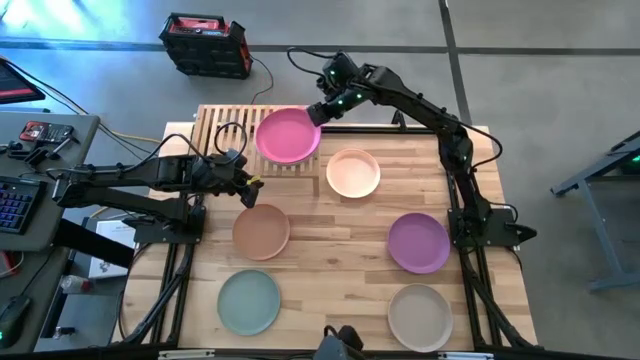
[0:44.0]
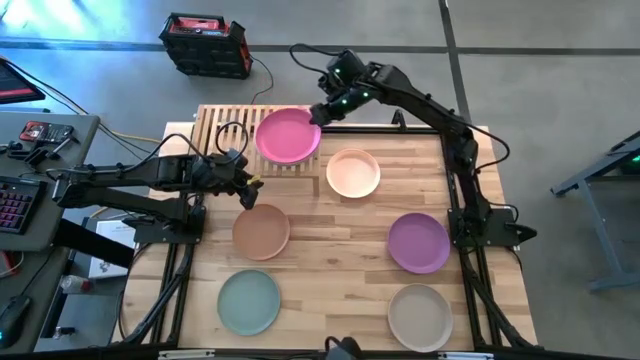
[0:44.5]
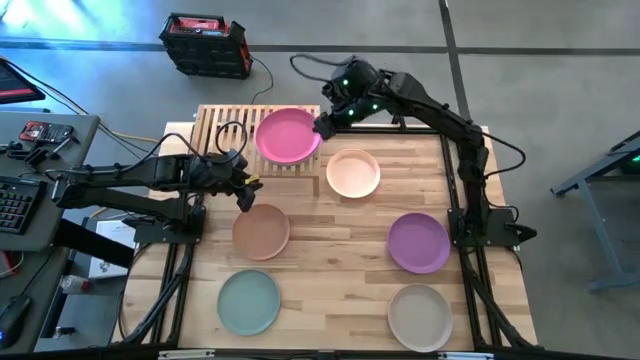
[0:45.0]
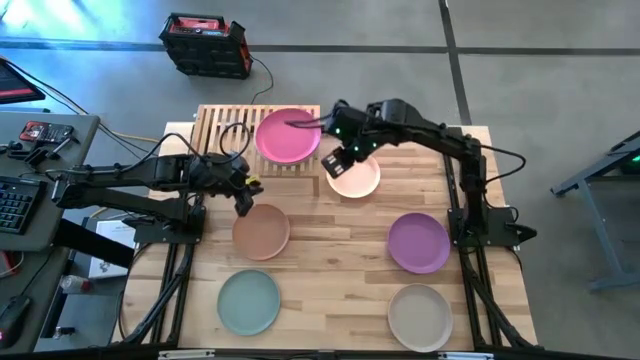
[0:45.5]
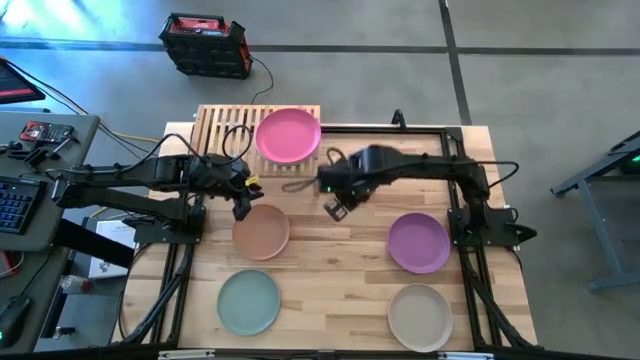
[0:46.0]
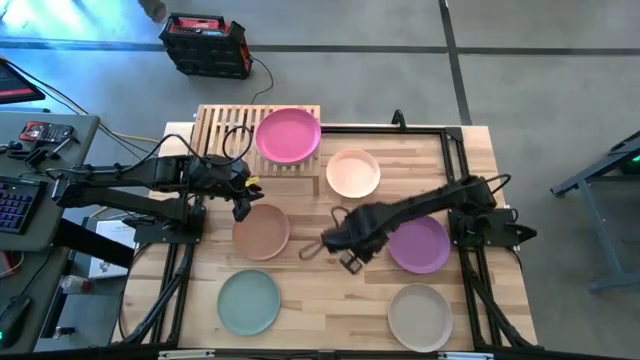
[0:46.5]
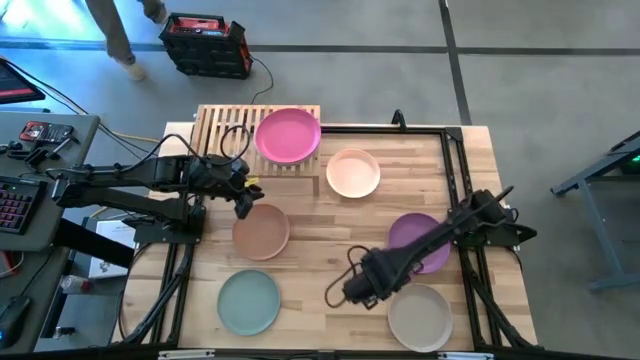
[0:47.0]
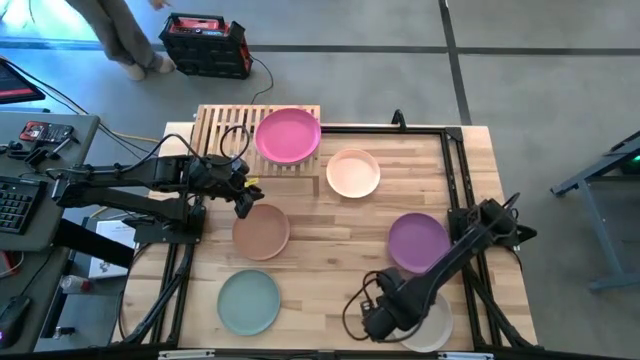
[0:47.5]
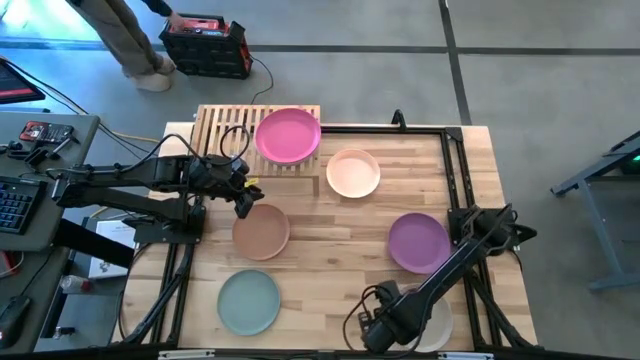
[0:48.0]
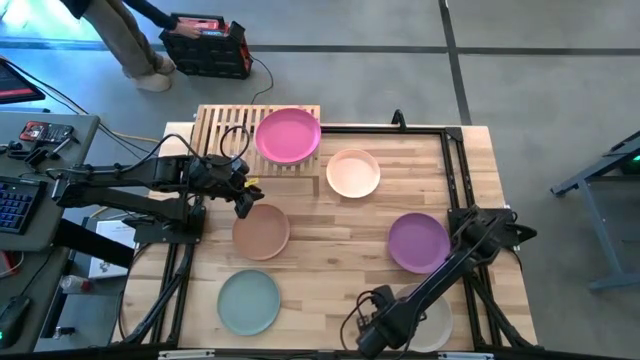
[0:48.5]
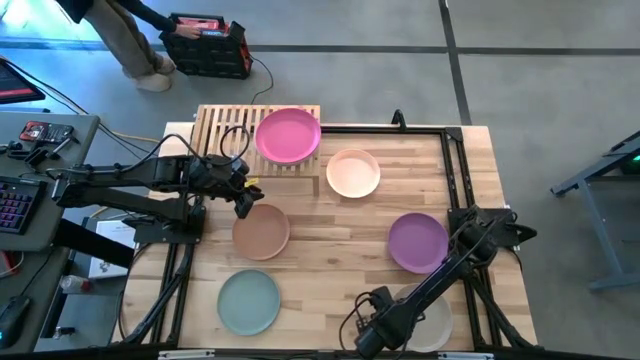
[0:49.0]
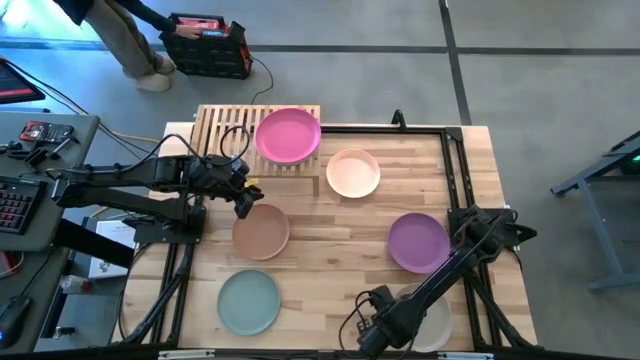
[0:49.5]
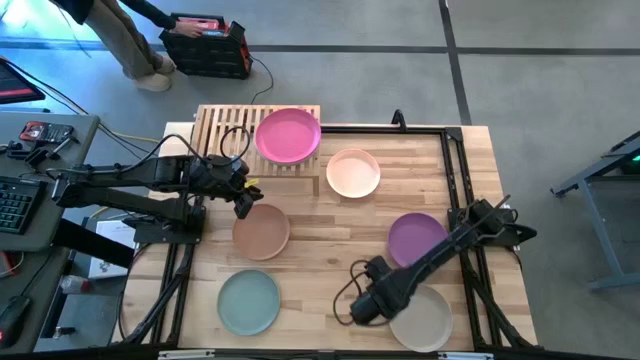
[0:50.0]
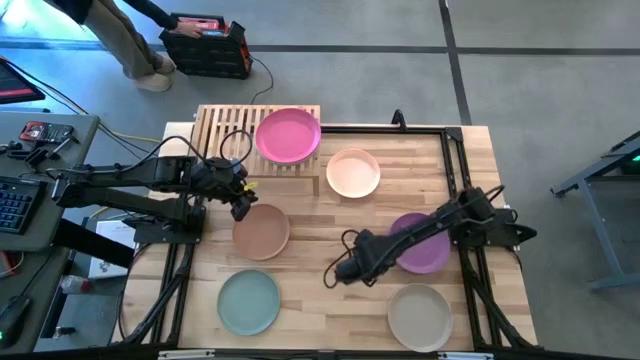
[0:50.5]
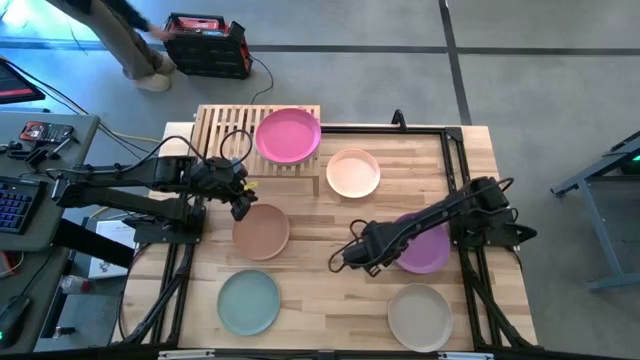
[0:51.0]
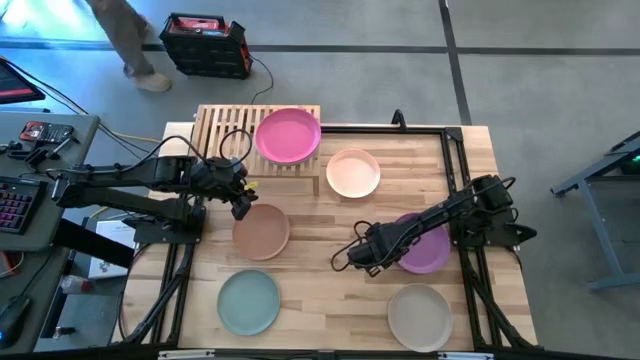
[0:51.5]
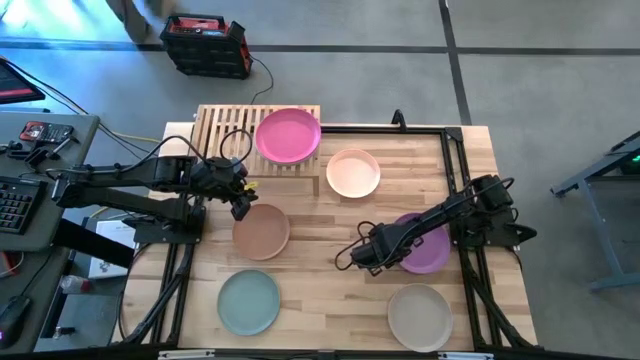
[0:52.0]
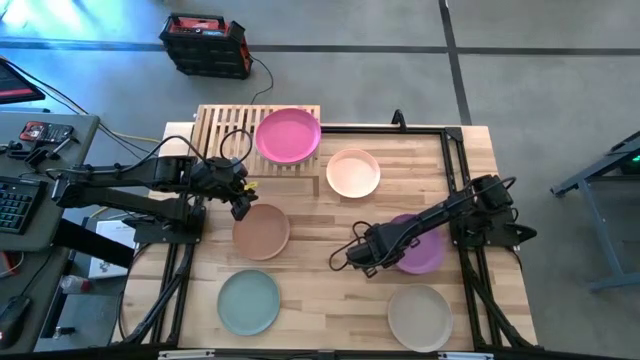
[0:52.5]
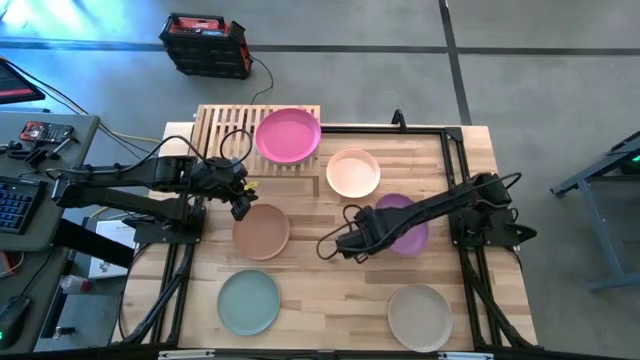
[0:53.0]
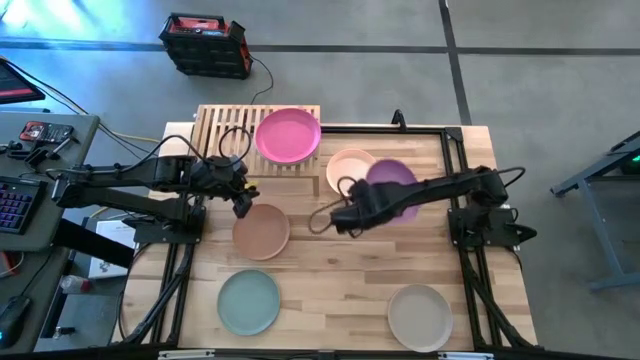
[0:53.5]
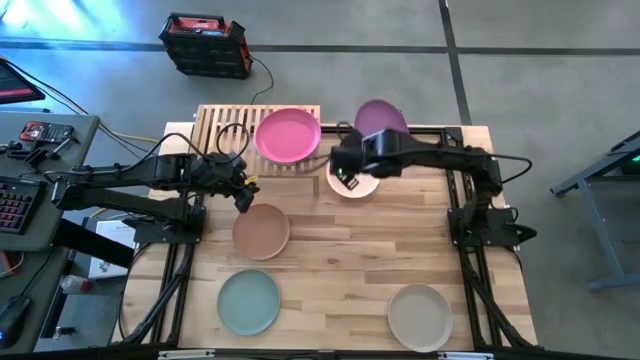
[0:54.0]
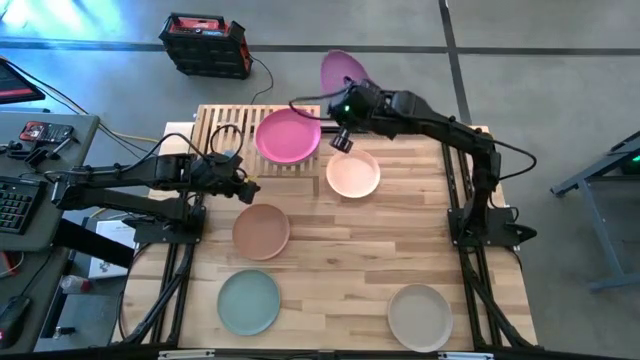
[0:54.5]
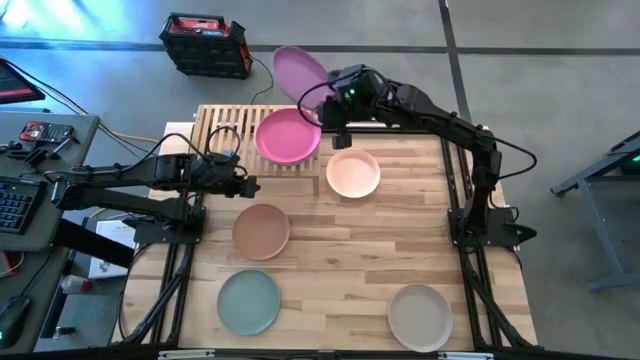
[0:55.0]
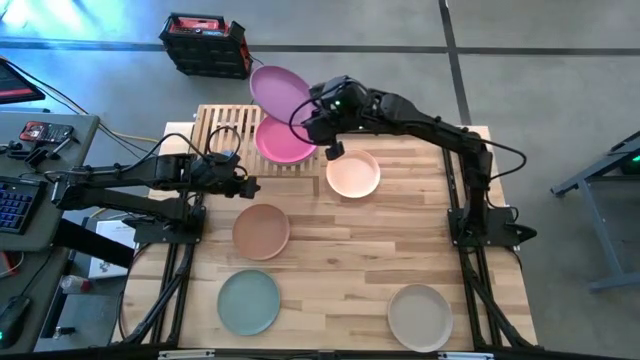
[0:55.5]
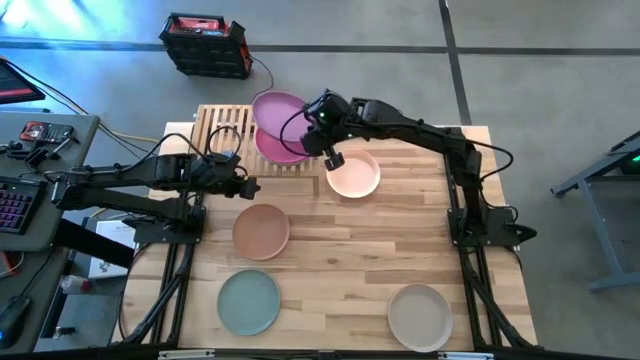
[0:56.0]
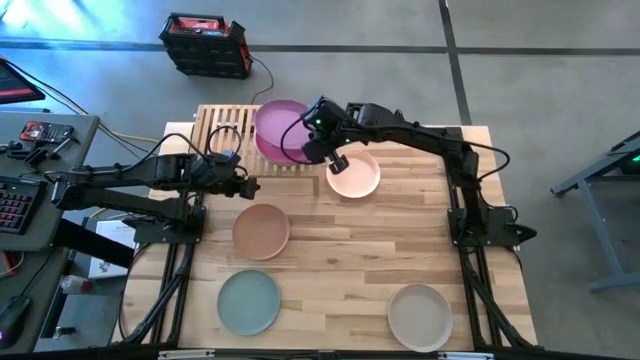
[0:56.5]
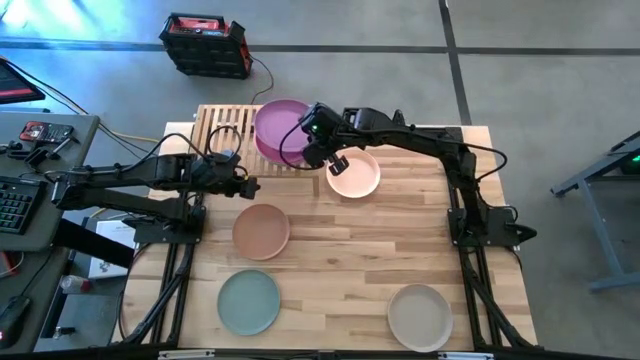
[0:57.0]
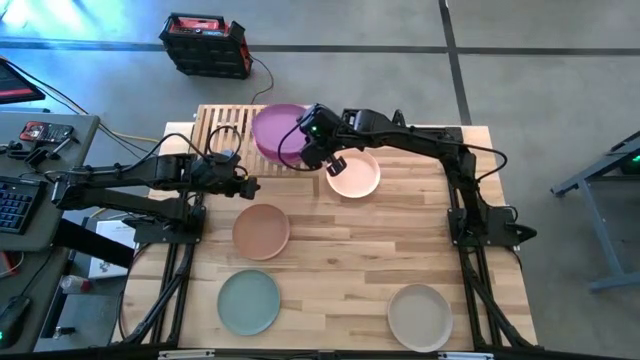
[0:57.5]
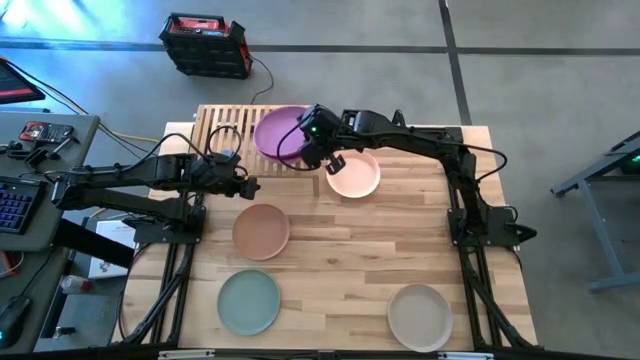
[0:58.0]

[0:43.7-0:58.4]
Task: Place and stack plates onto a shelf
Stack the brown plate on top of the pink plate on the shelf

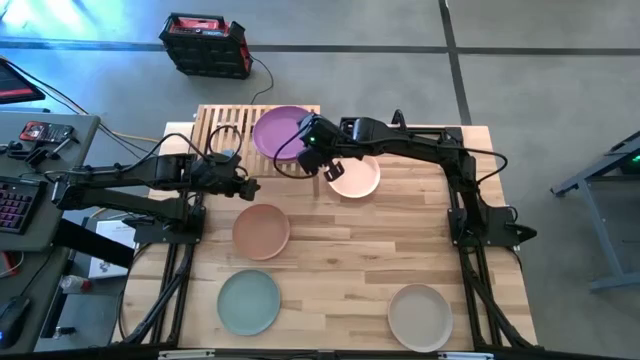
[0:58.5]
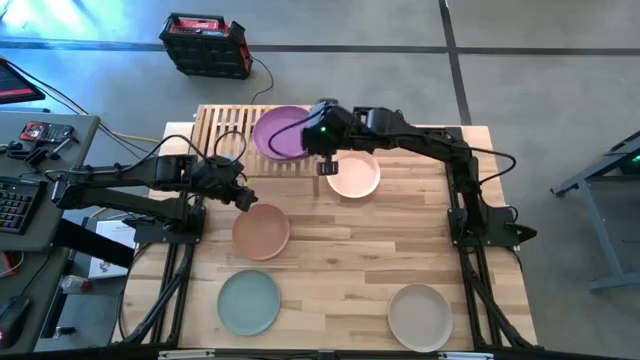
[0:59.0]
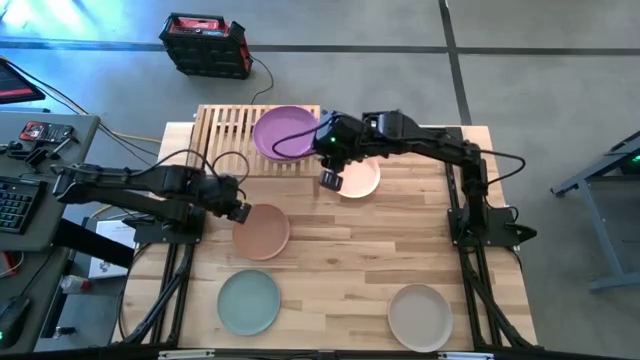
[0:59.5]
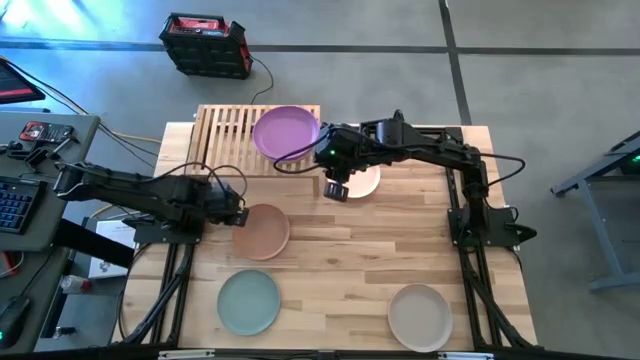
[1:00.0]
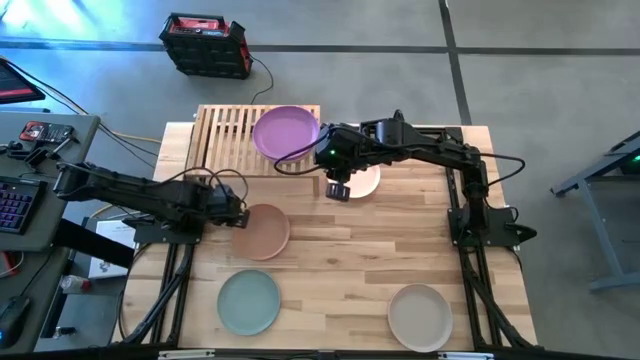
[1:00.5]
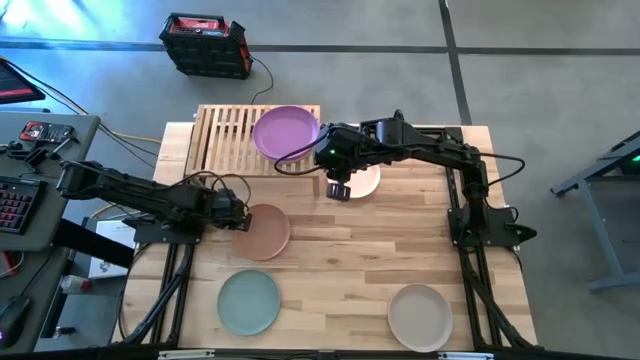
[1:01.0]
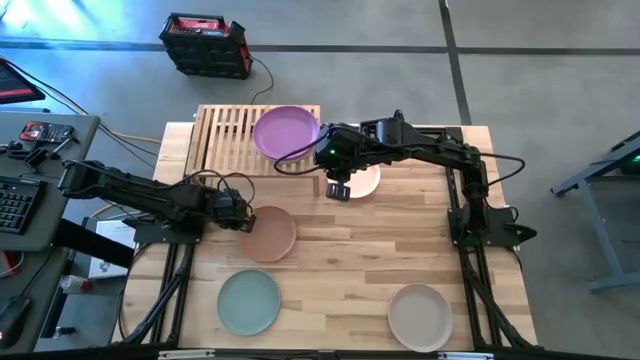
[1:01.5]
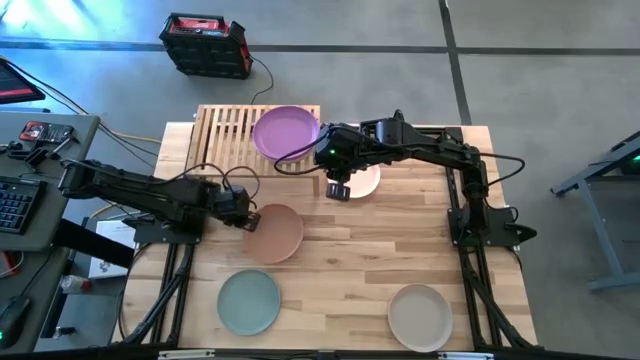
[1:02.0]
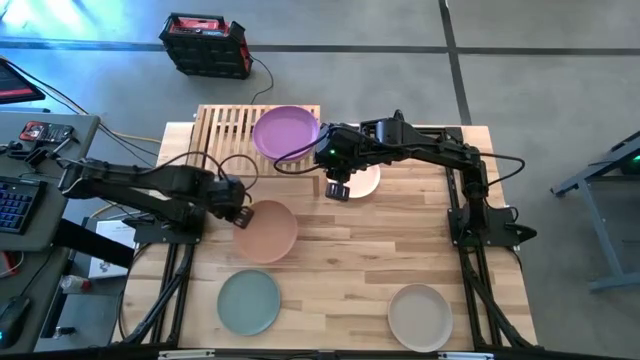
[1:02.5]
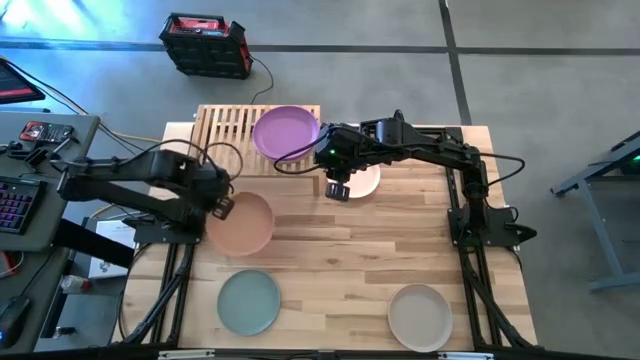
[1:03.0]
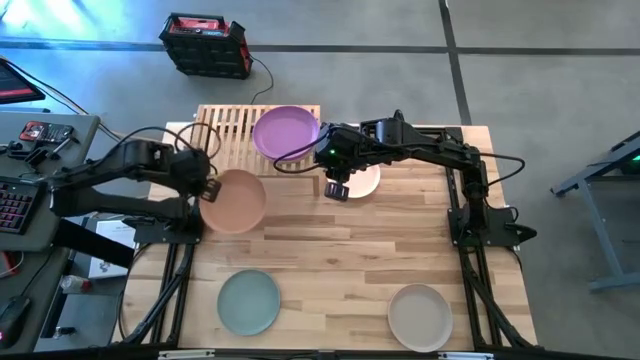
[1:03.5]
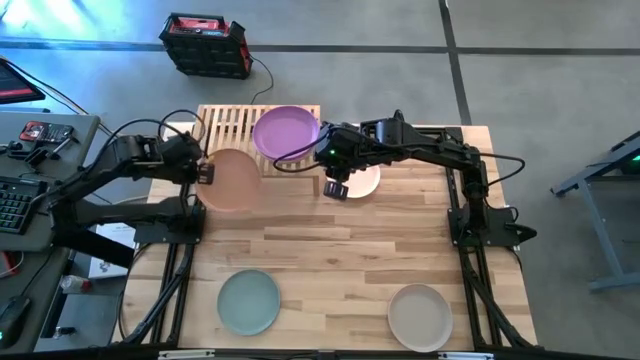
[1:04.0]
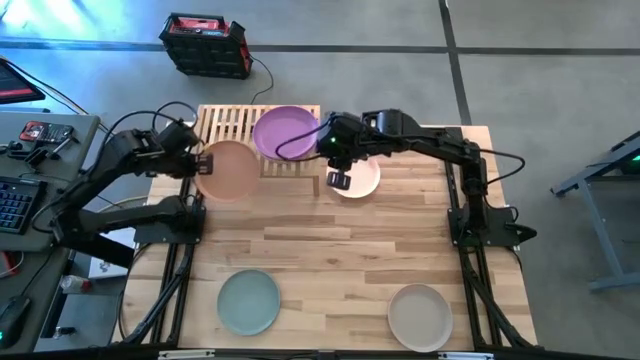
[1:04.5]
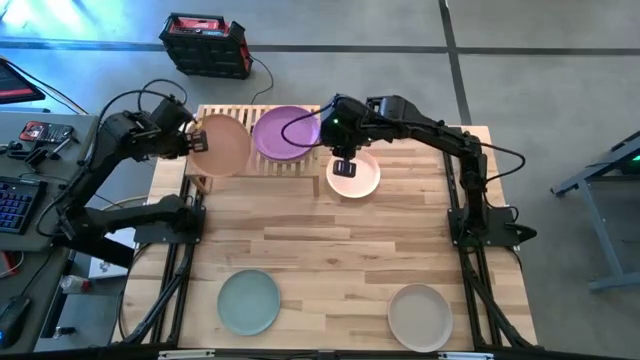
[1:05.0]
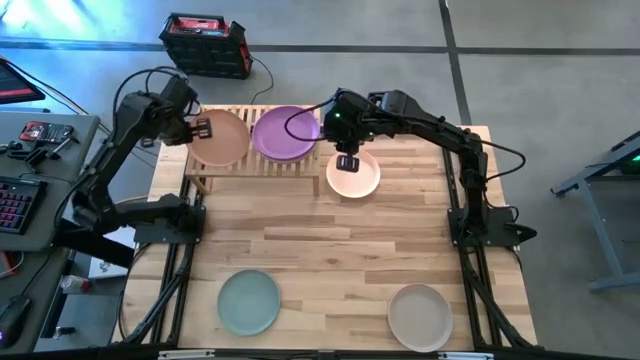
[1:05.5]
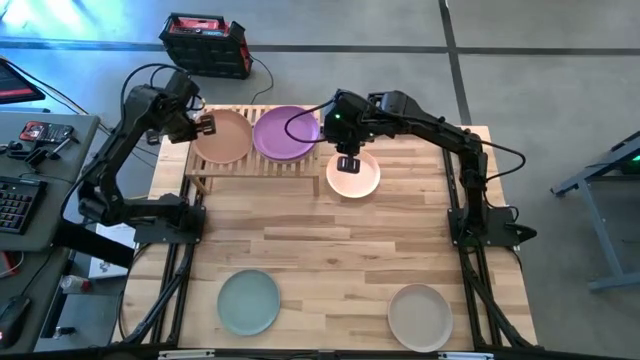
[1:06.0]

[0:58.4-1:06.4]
Put the dark brown plate on the shelf
